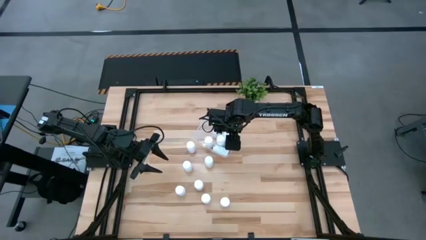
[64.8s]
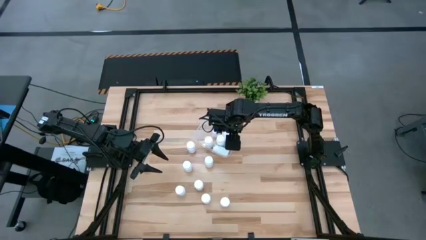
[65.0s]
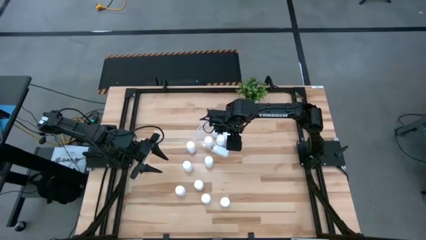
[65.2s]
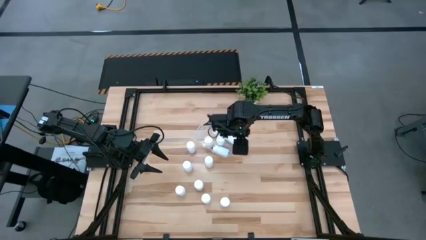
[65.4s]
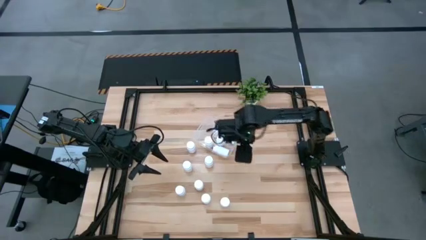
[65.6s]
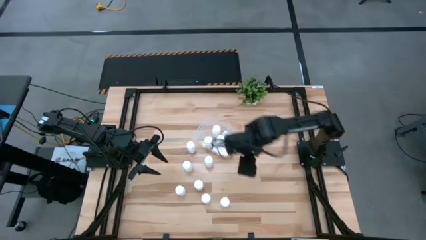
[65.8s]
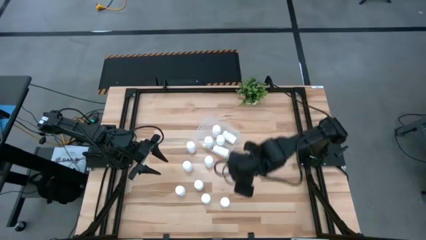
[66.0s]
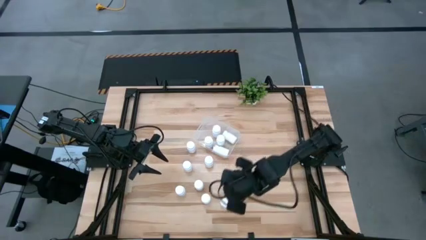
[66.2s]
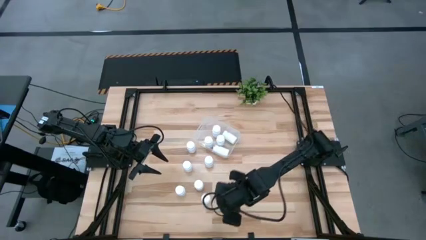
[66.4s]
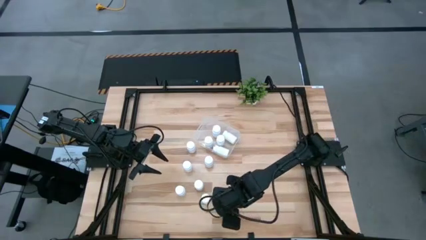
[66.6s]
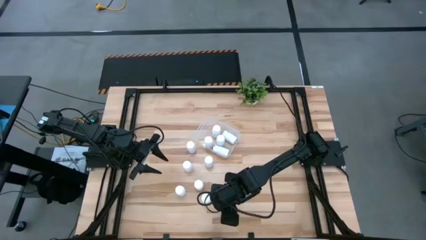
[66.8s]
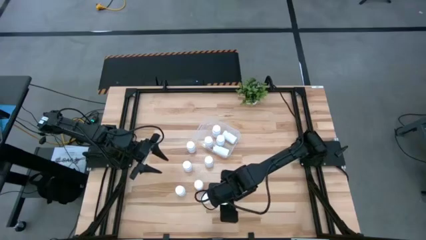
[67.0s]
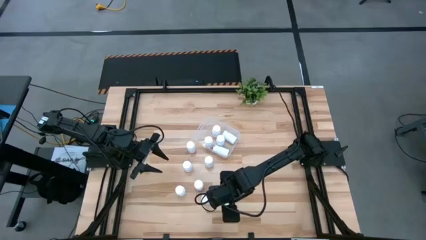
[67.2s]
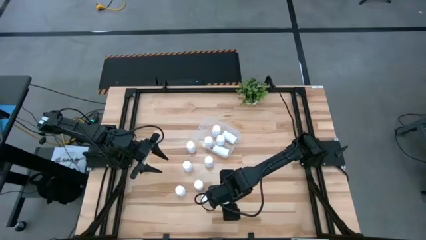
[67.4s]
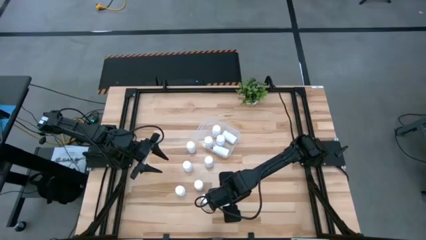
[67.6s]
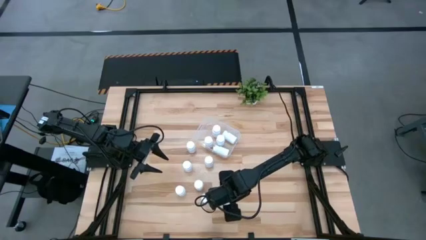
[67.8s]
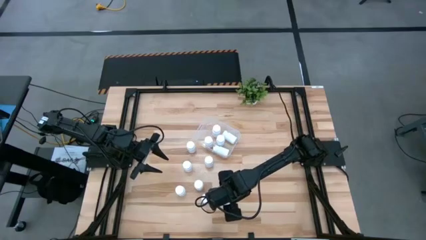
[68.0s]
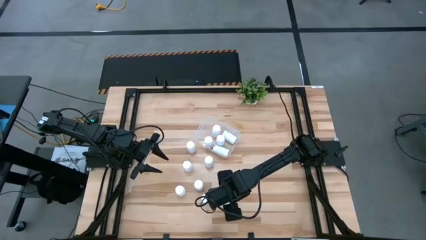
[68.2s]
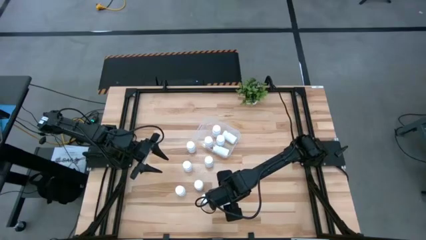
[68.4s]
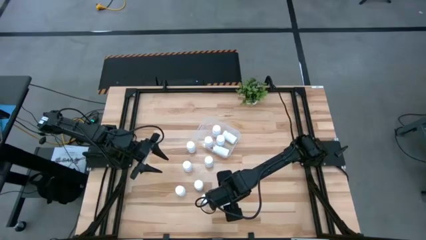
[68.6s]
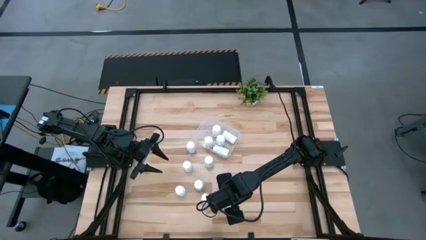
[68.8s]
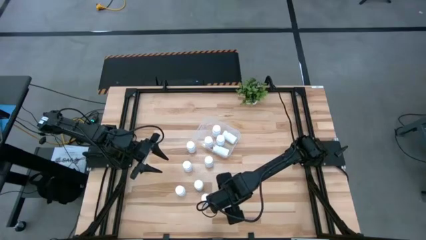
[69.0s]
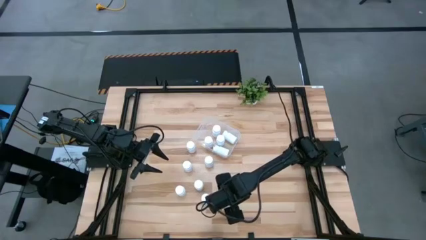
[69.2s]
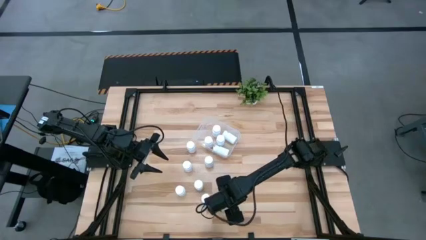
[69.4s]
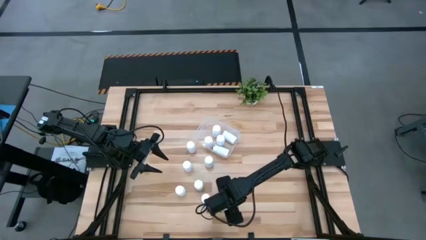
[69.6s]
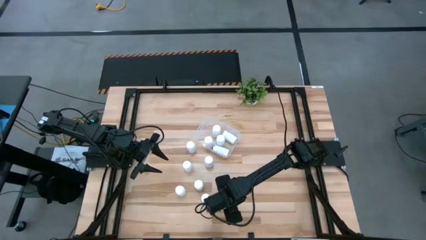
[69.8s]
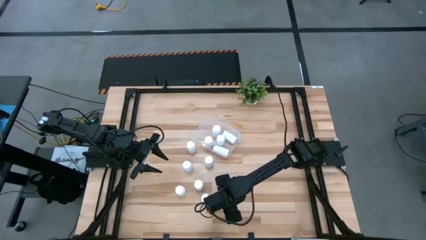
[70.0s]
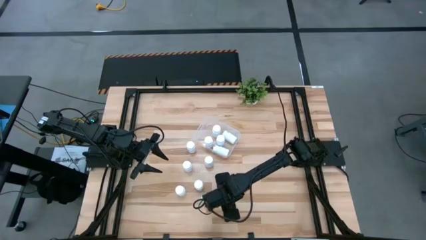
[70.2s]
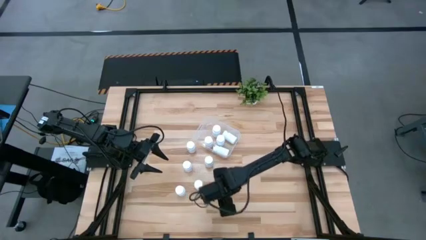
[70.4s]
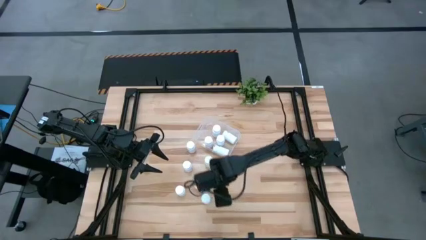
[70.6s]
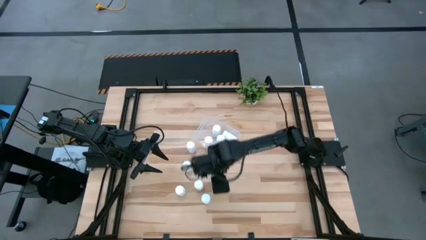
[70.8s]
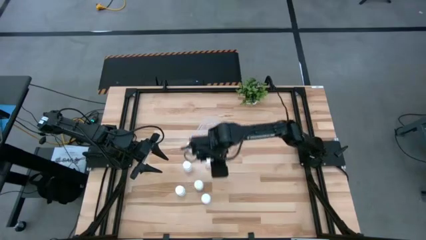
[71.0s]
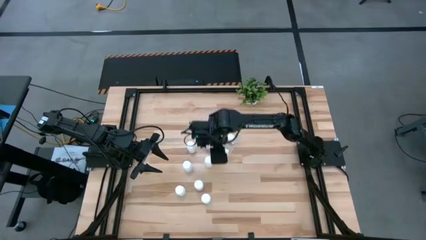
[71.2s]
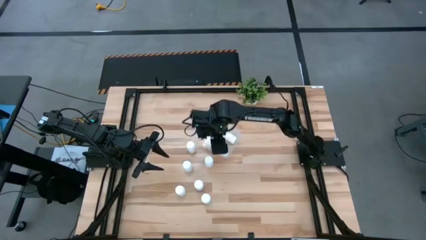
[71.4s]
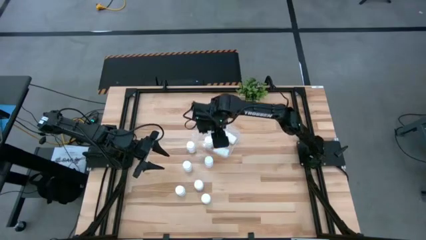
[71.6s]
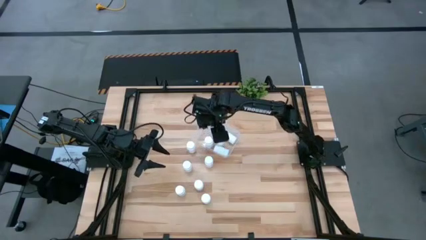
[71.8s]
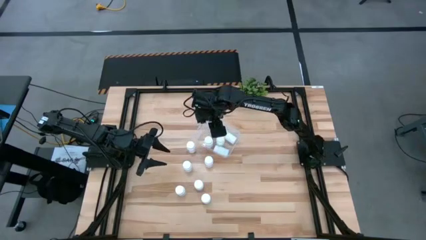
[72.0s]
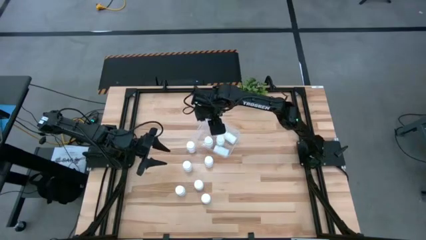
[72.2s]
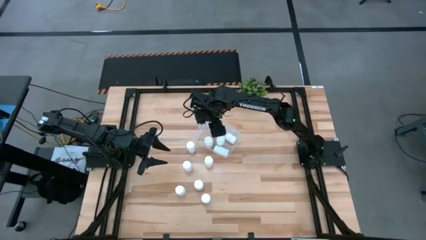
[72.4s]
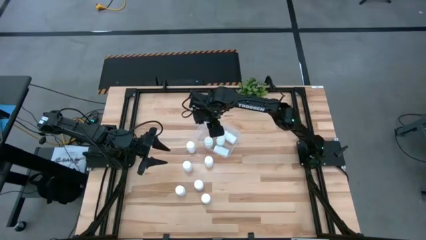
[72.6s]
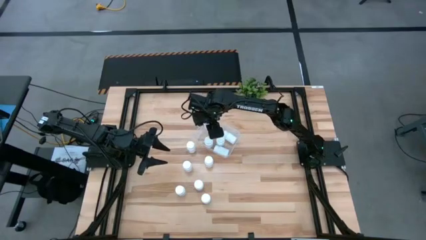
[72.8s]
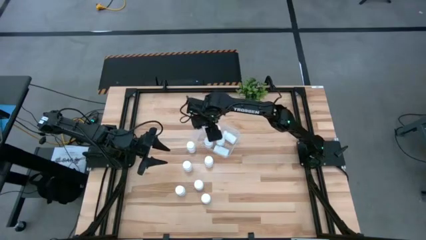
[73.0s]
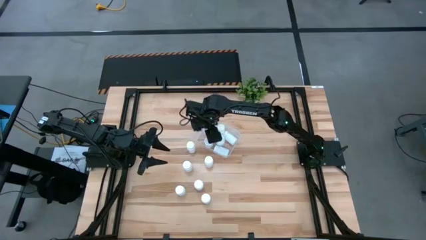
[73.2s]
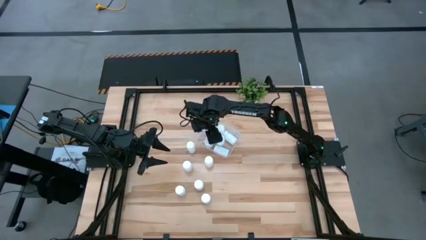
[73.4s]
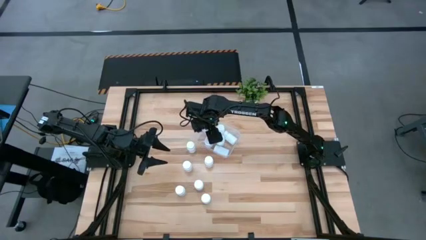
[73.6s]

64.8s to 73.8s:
Task: Pick and place pill bottles into a basket
Put the pill bottle into the bin

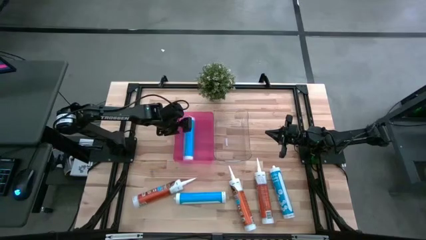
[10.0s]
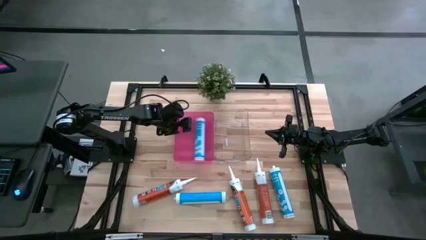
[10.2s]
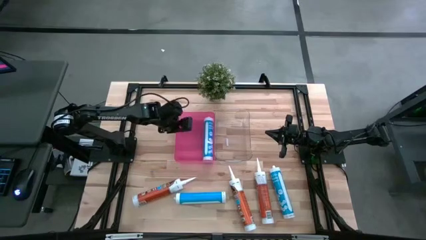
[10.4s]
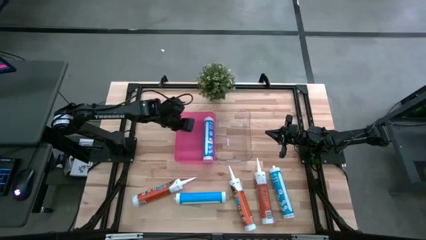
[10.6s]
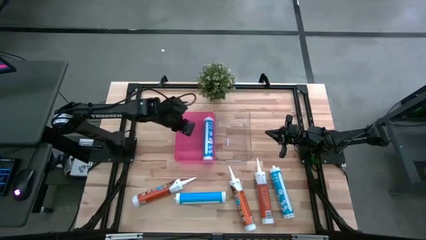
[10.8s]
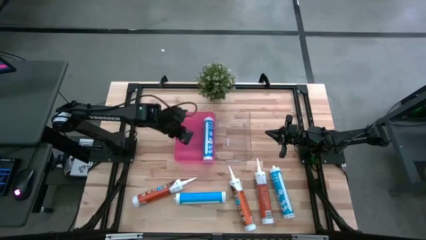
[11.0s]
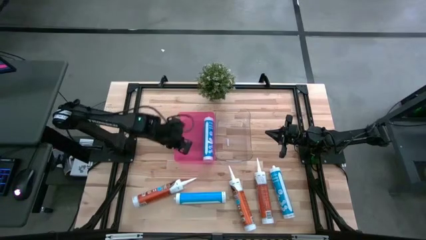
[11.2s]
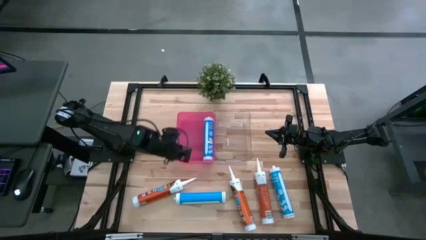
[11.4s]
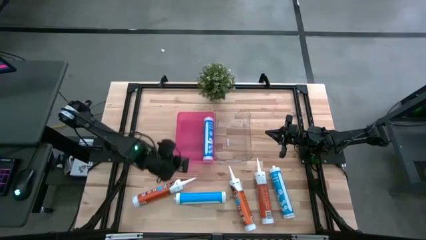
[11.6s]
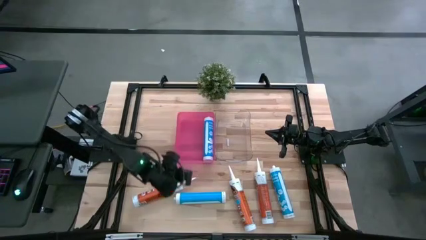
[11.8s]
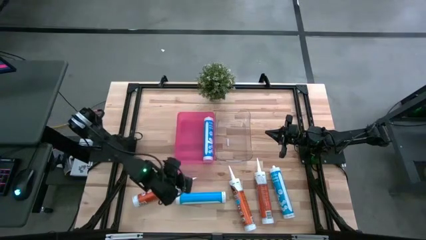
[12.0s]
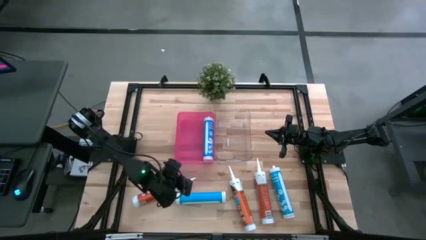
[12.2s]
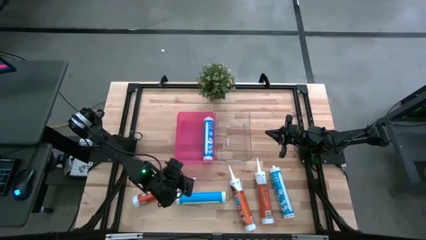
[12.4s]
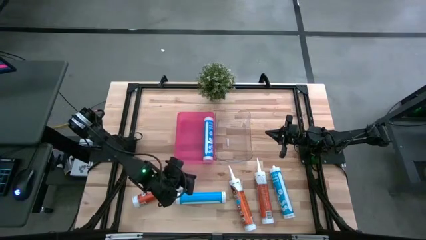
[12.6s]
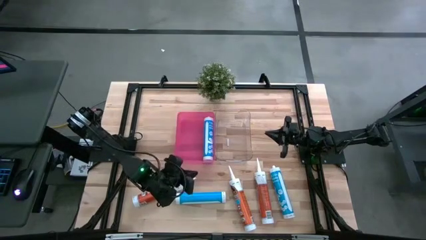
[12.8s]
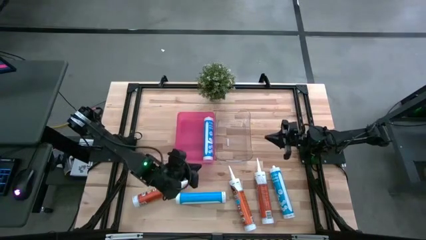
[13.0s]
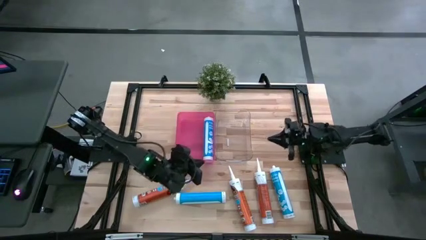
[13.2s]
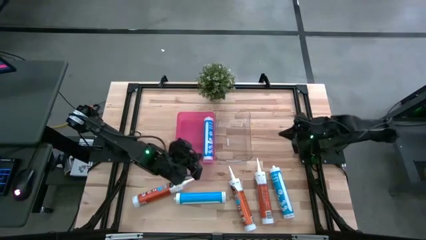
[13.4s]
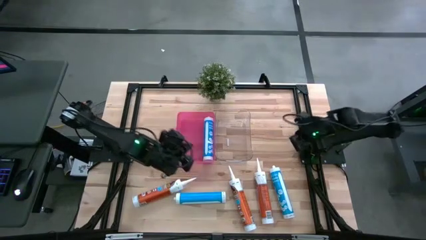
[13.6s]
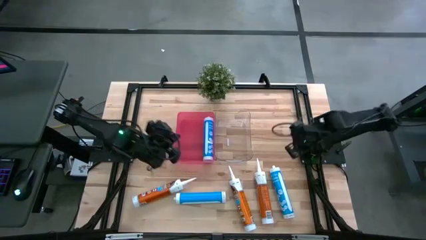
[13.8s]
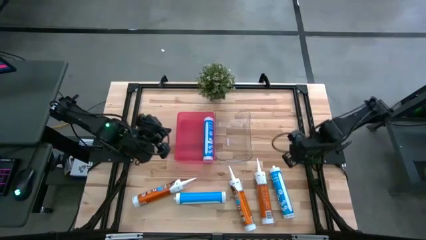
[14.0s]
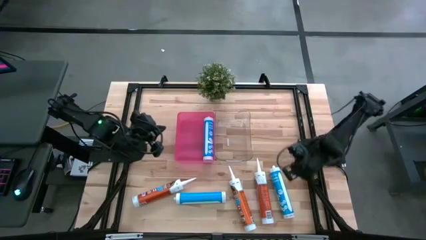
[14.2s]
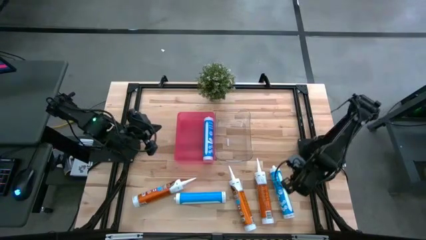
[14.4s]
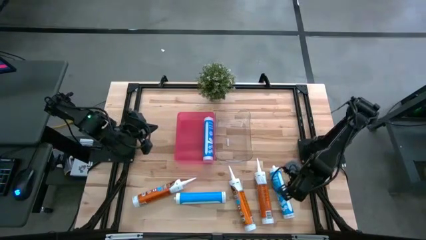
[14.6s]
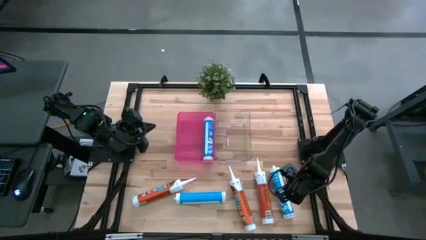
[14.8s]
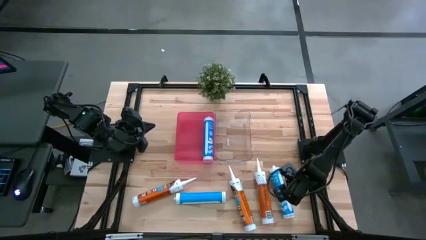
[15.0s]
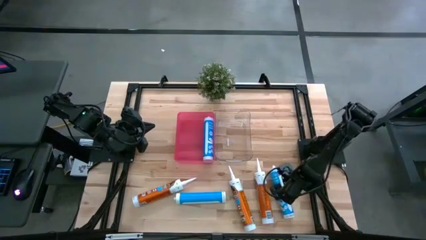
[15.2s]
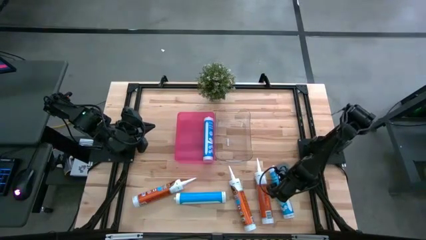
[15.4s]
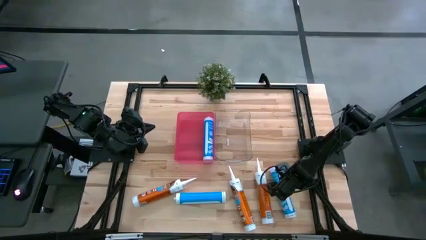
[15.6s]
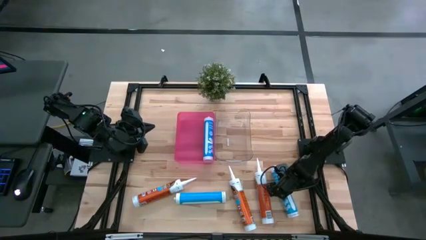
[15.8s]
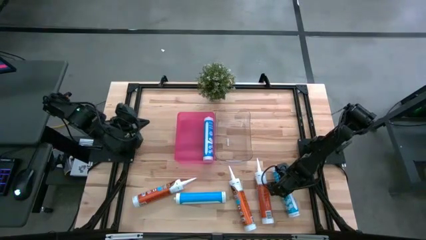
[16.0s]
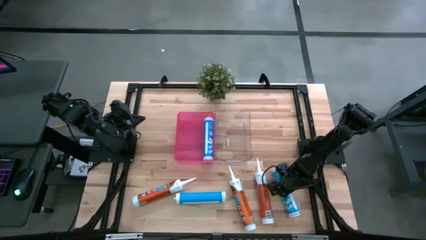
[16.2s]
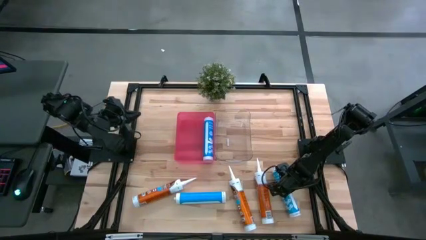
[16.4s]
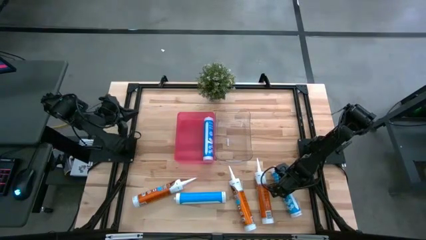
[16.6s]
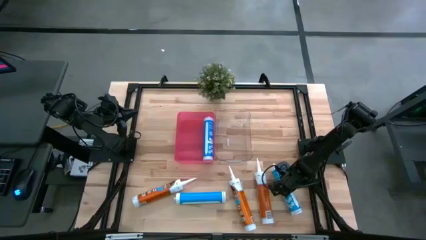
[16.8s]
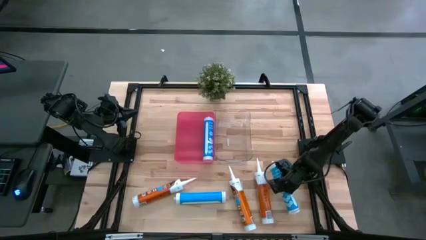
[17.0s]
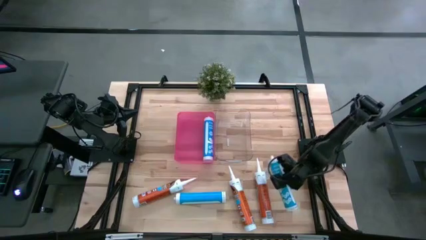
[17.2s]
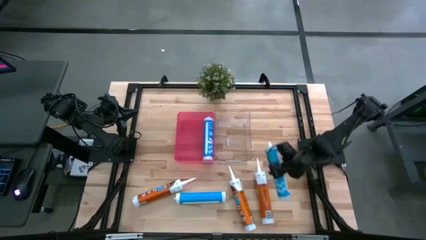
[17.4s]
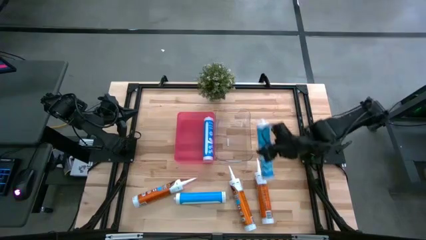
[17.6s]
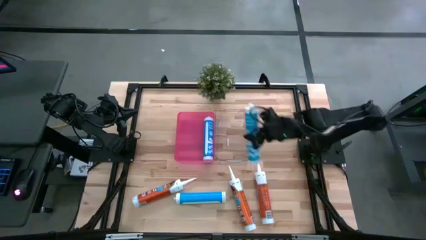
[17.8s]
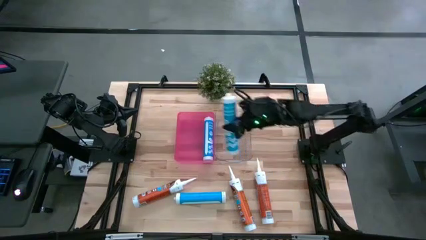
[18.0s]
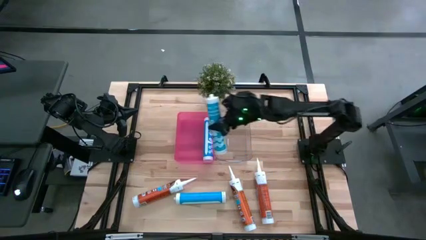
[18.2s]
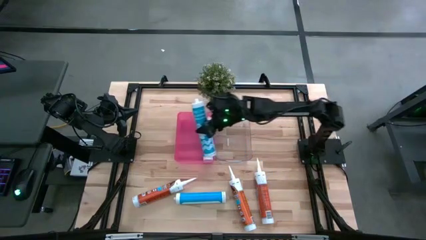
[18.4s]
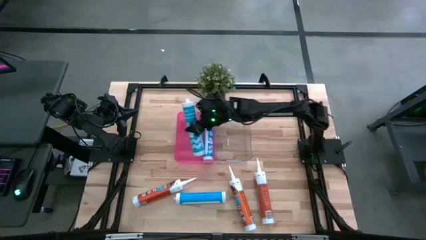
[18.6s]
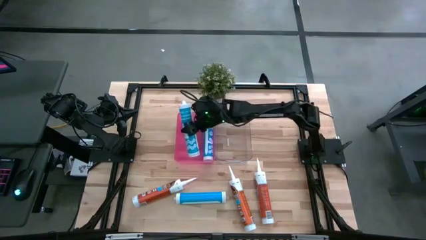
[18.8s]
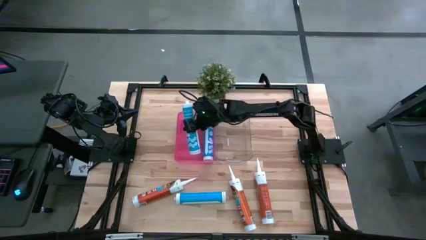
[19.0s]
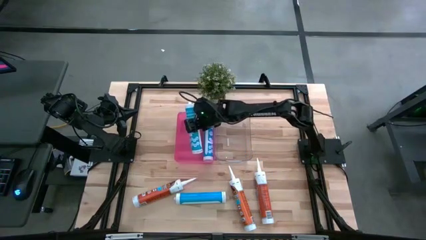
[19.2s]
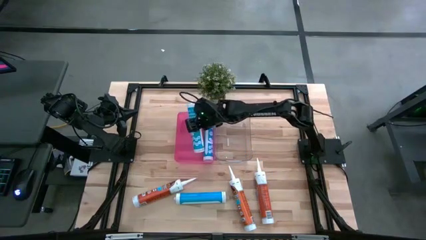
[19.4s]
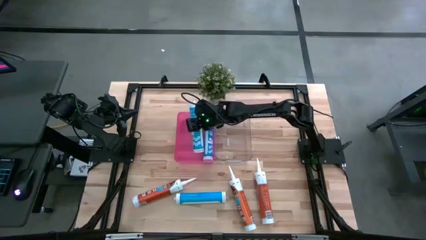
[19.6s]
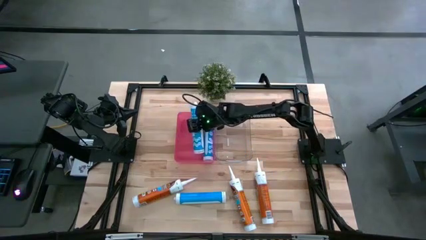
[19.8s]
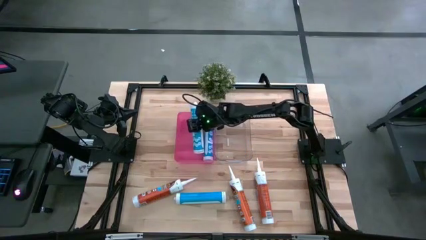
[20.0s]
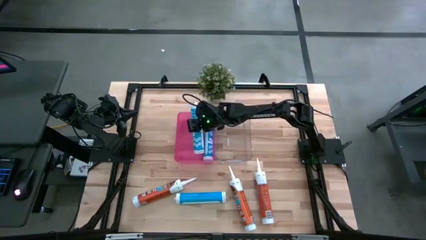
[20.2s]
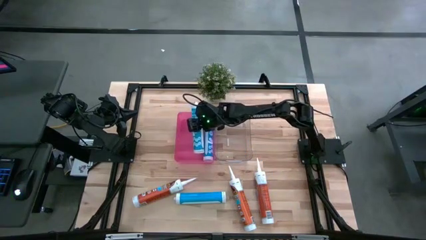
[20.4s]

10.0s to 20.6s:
Task: Pick & place silicon tubes, Sealant and Lysol wipes
Put the right blue sealant into the pink bin
